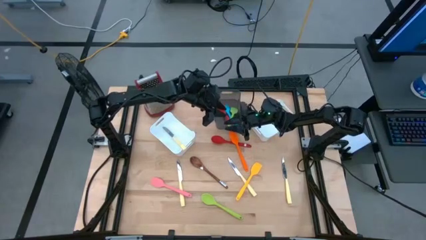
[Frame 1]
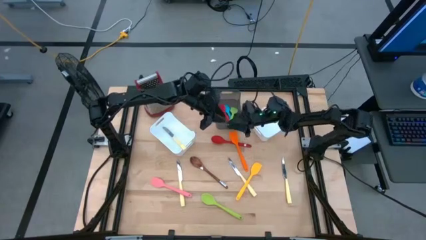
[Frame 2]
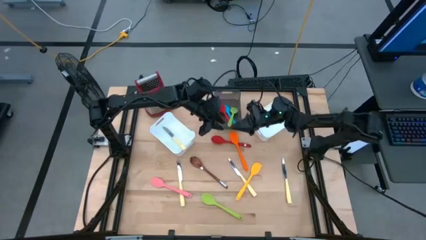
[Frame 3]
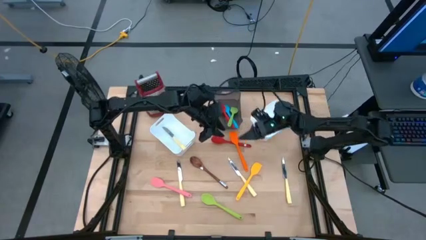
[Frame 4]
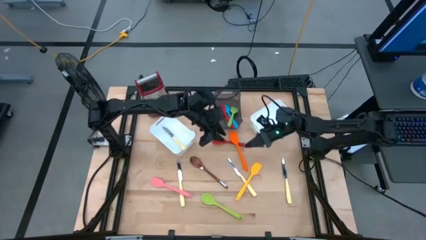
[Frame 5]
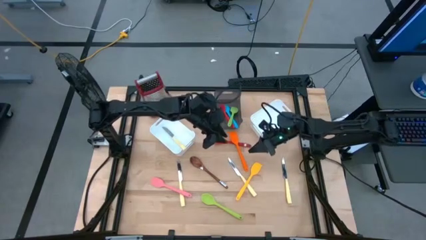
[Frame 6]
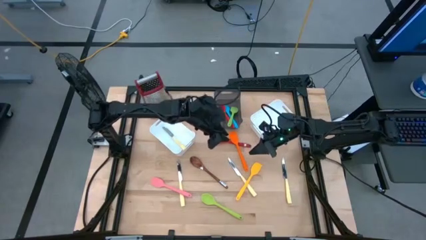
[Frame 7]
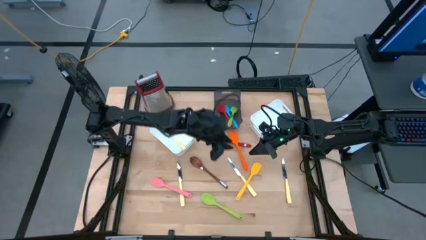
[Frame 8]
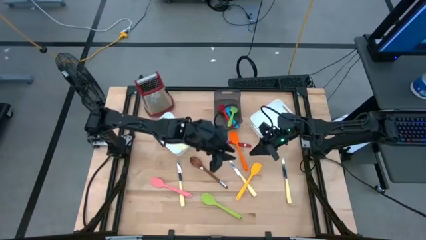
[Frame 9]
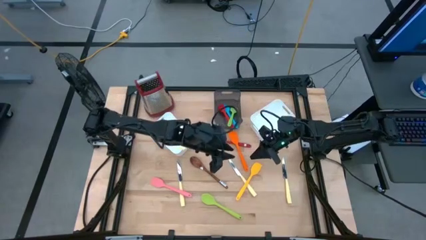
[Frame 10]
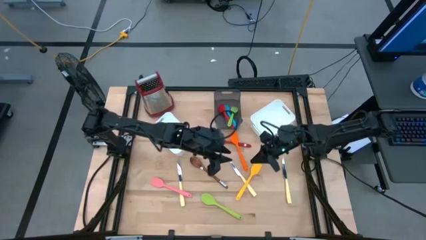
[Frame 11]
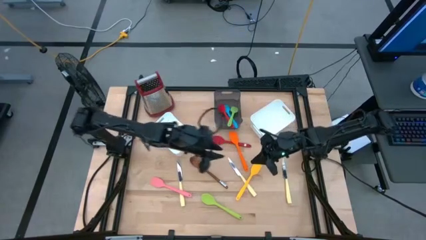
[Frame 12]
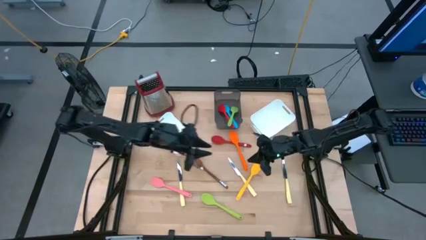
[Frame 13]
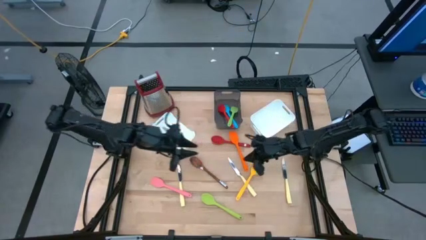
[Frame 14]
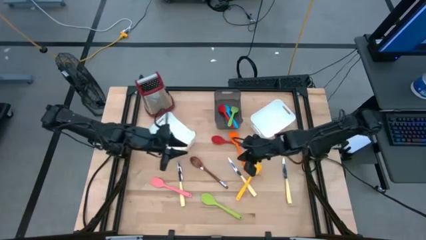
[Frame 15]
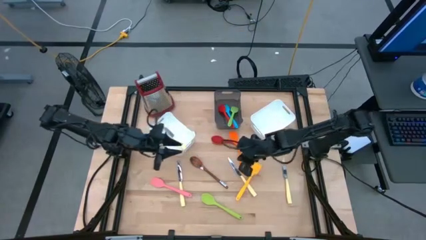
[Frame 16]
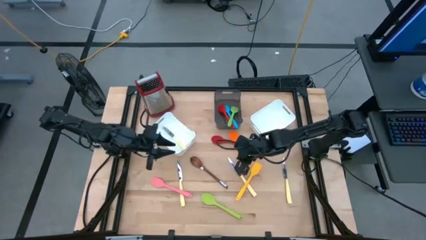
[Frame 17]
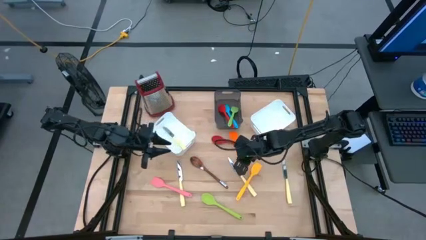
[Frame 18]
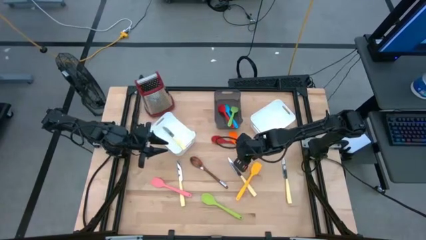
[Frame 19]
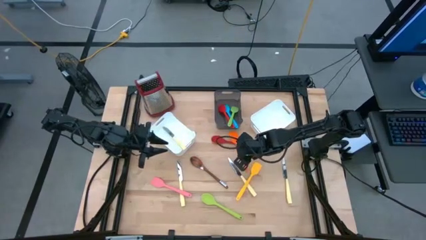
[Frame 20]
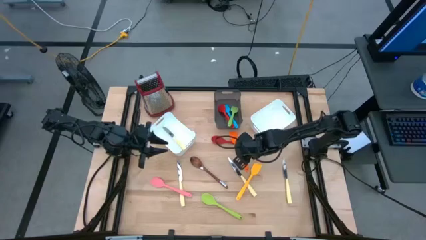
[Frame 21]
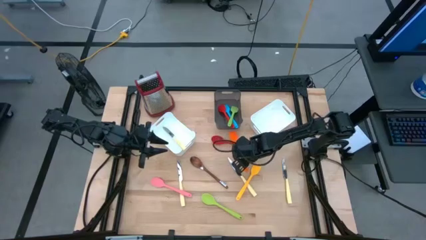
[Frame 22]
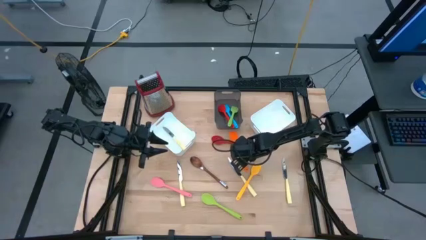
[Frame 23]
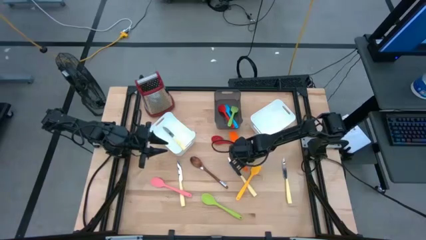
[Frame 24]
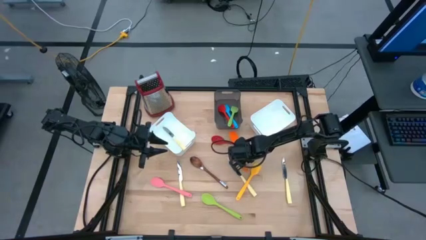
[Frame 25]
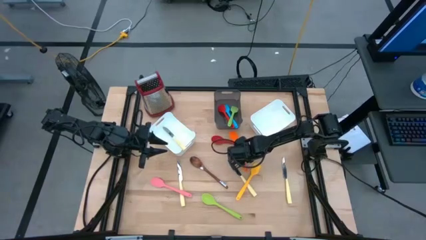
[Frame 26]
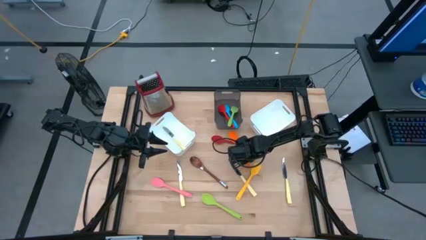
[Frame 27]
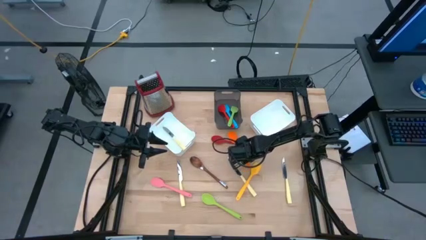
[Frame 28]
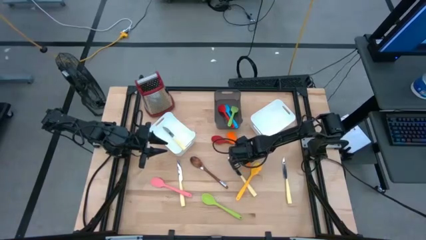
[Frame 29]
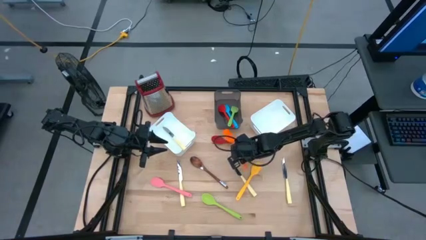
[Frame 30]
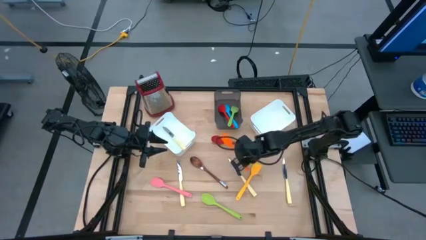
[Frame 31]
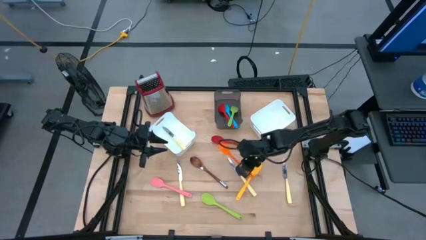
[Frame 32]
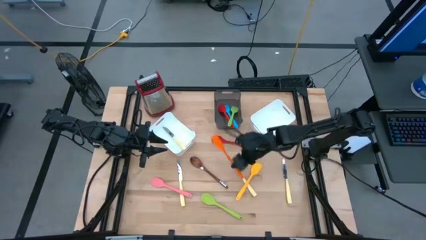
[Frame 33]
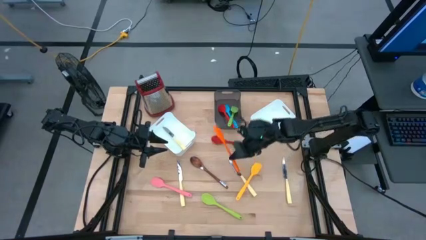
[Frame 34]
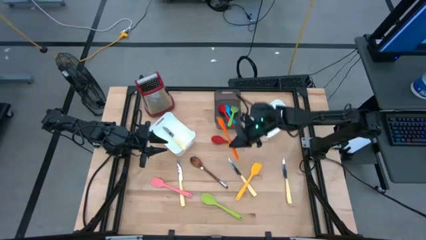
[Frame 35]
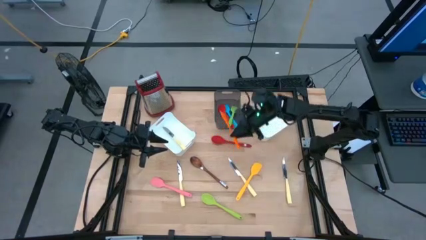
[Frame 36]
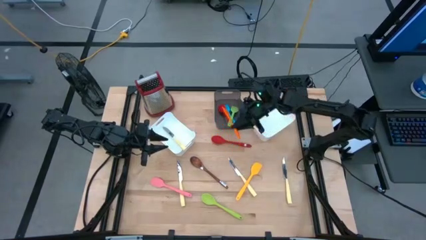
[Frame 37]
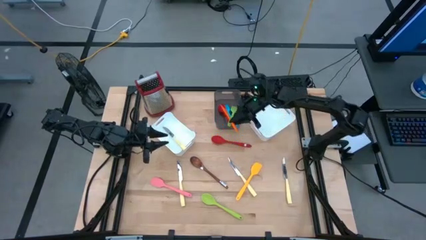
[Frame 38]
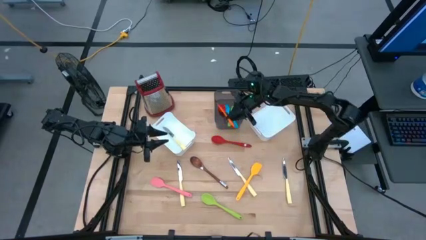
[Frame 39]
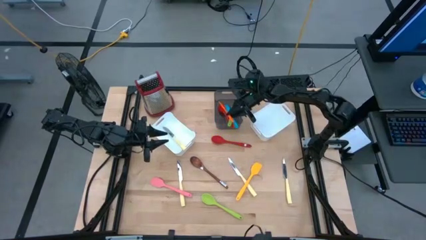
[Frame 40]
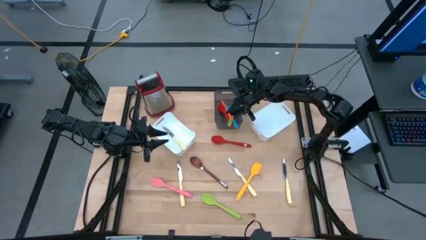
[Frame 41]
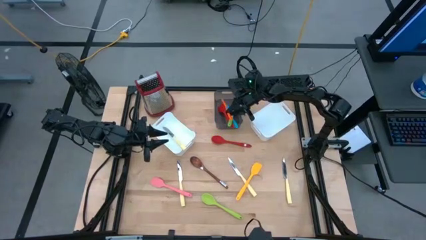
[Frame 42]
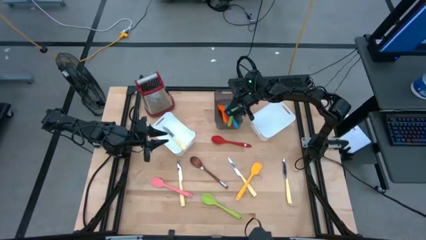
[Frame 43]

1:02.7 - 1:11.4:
Task: Pick & Place Kitchen Items
Put the orange spatula into the black bin
